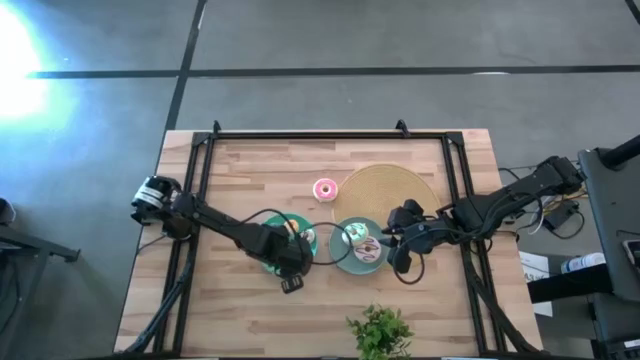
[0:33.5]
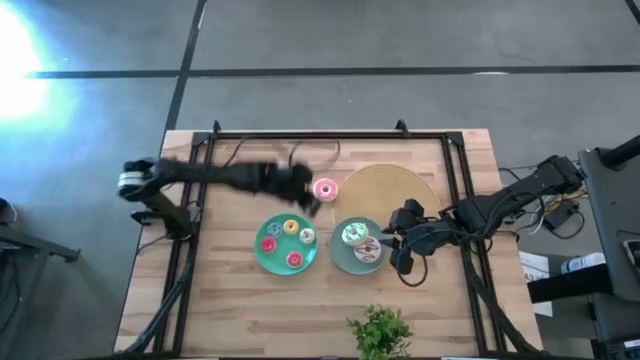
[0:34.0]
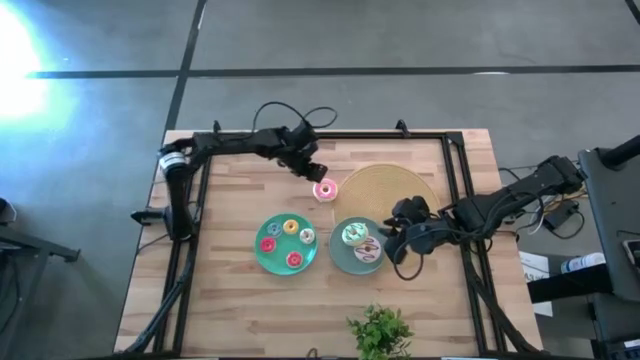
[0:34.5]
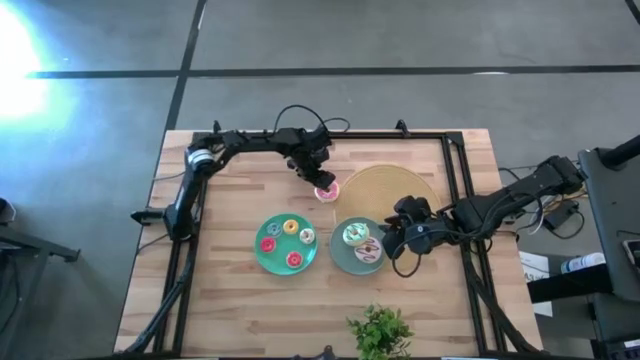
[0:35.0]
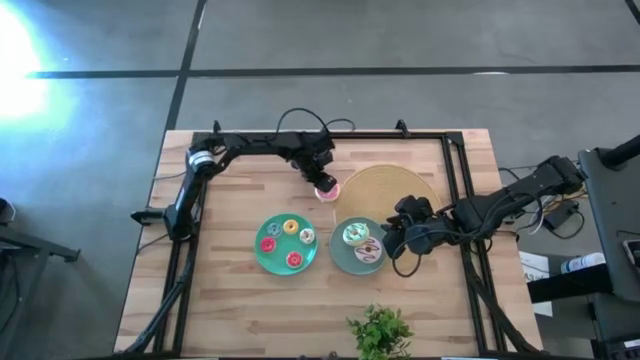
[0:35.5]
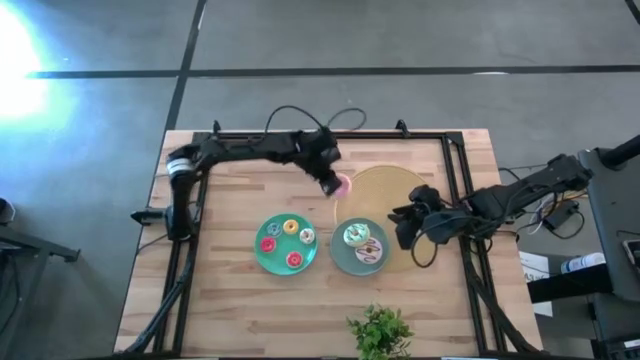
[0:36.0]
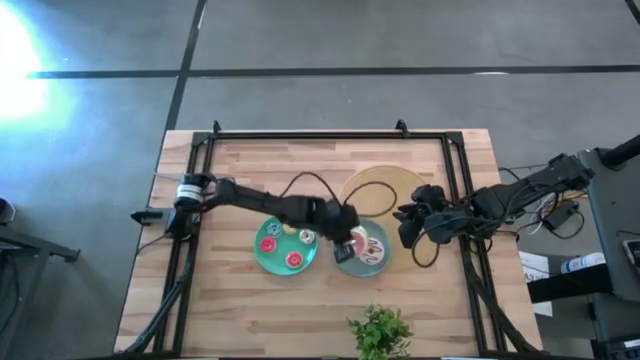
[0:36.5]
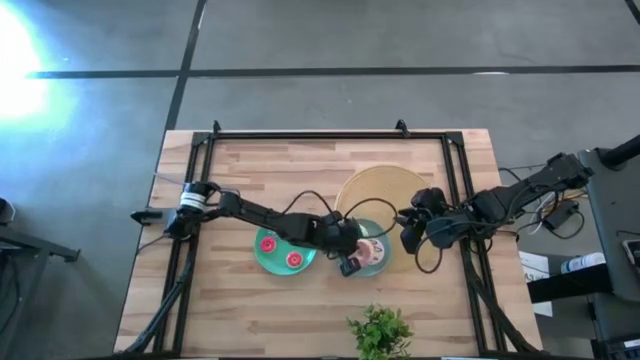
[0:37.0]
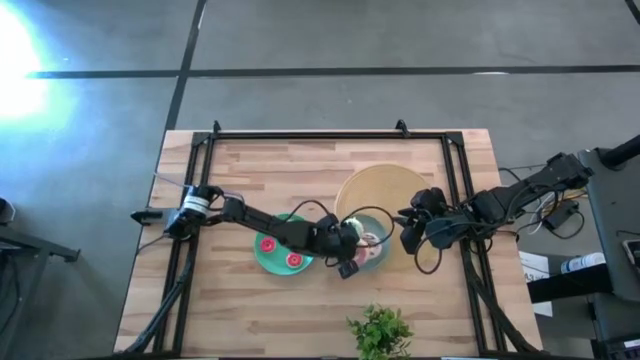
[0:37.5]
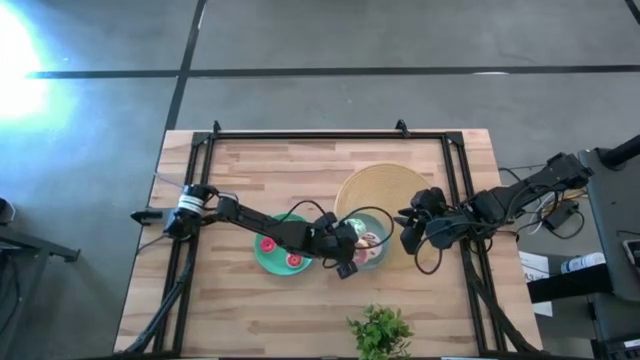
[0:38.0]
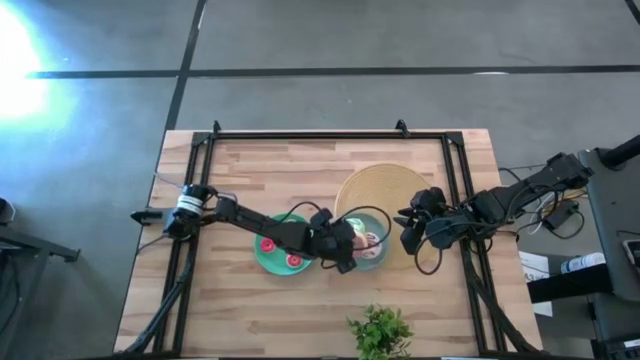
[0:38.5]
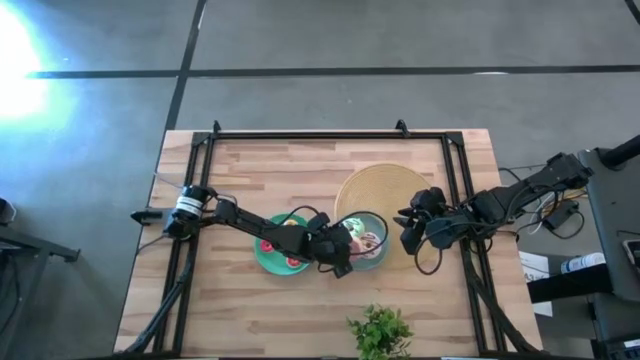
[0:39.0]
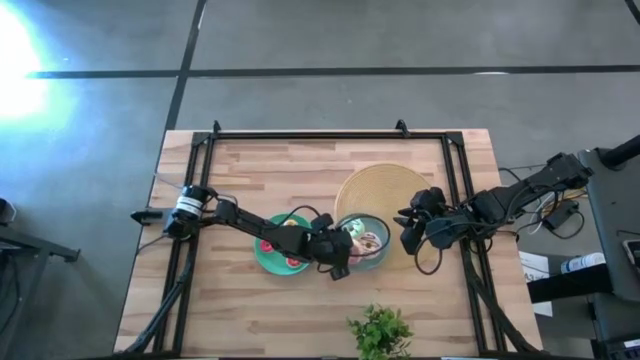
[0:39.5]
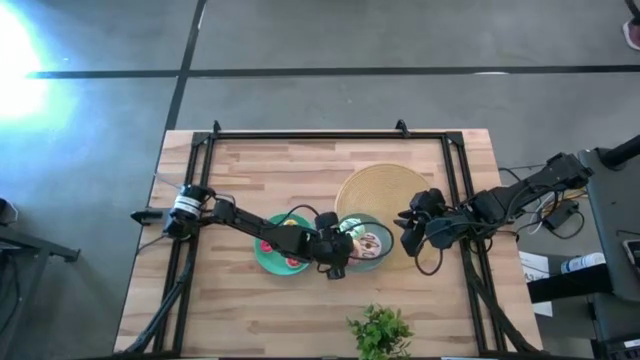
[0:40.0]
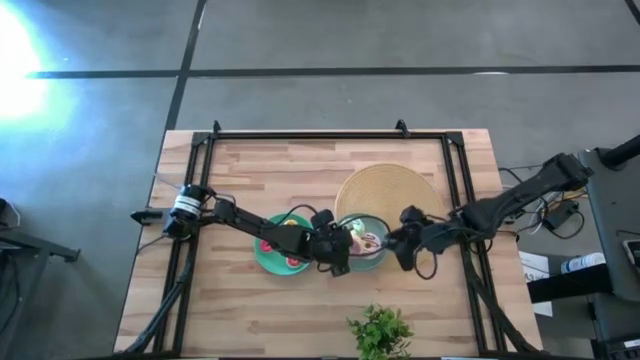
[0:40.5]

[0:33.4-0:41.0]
Task: Pick & Place donuts
Put the big pink donut on the light blue plate

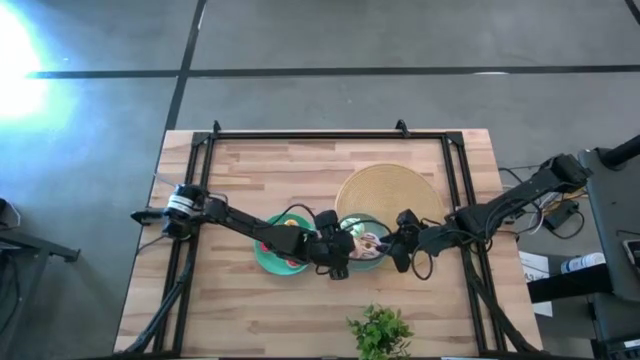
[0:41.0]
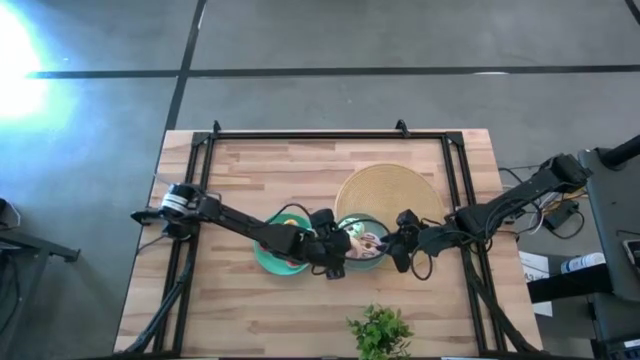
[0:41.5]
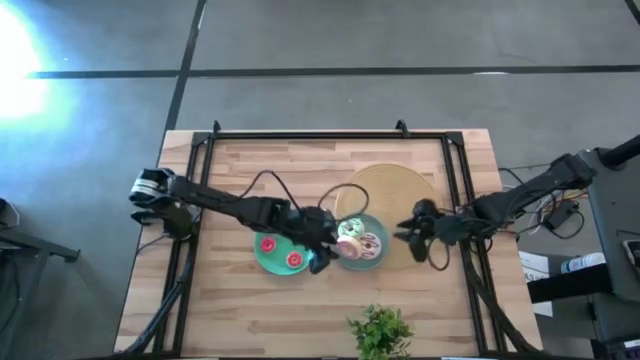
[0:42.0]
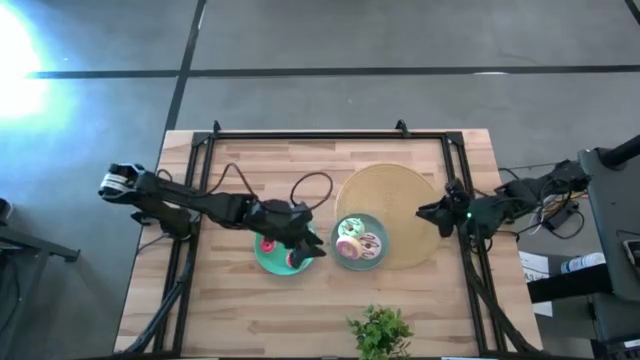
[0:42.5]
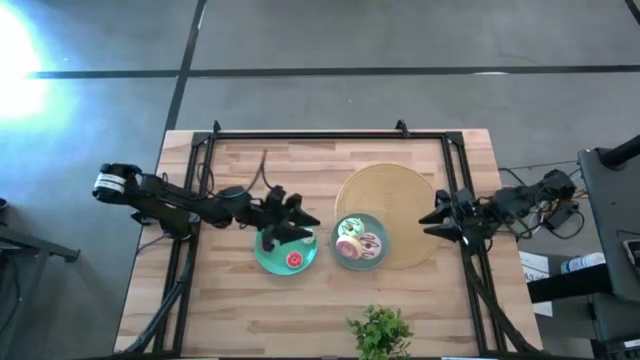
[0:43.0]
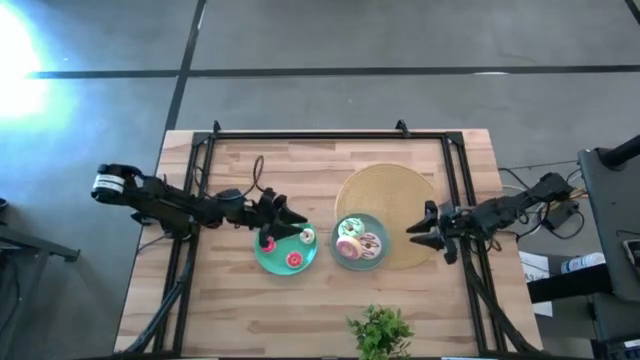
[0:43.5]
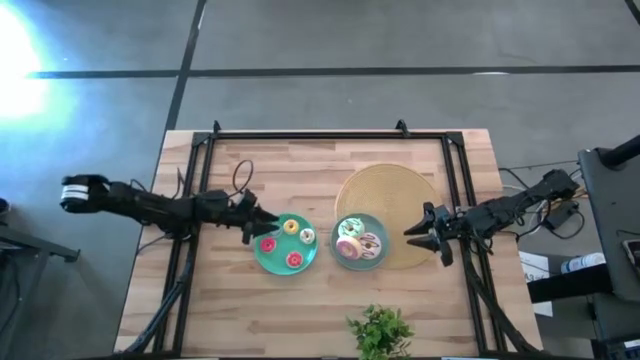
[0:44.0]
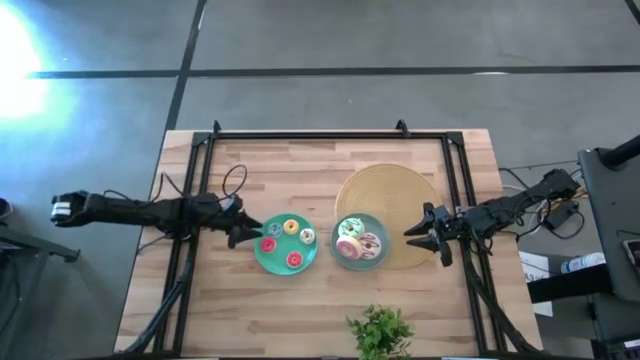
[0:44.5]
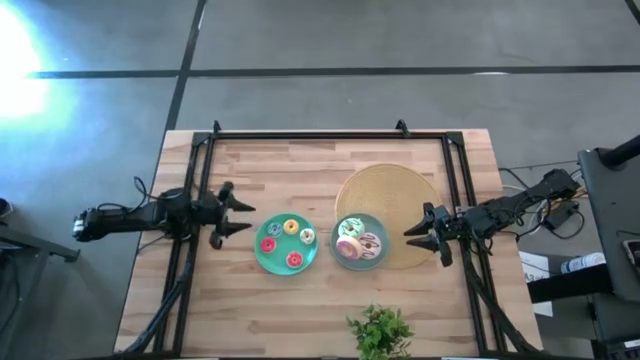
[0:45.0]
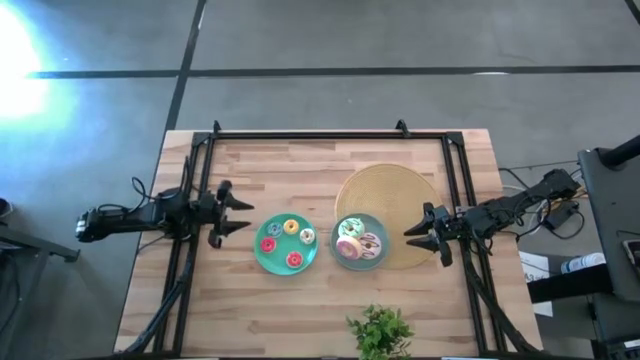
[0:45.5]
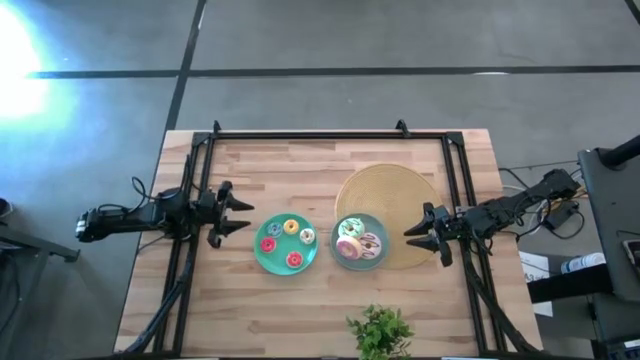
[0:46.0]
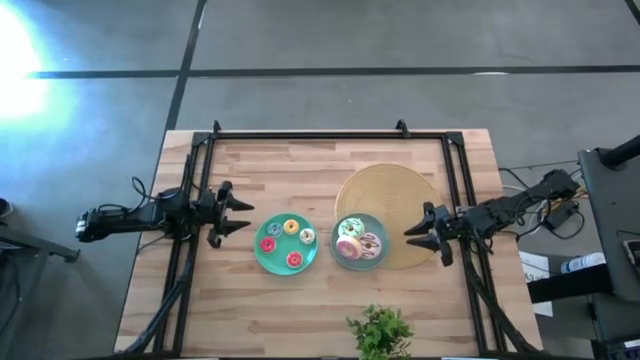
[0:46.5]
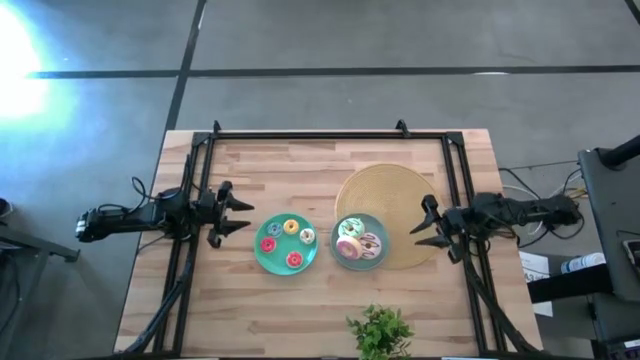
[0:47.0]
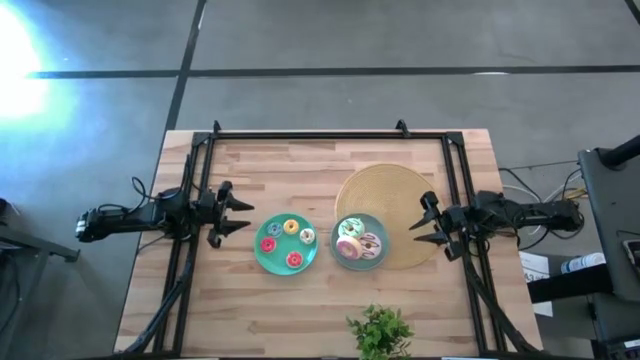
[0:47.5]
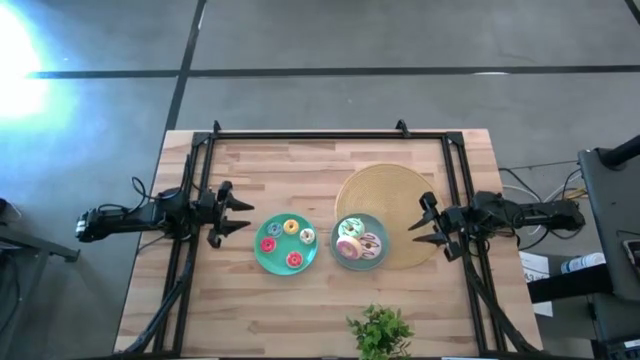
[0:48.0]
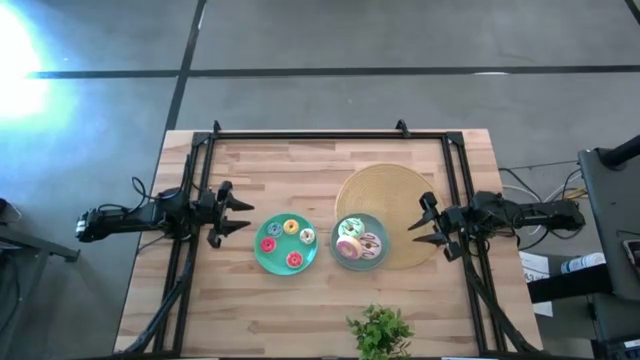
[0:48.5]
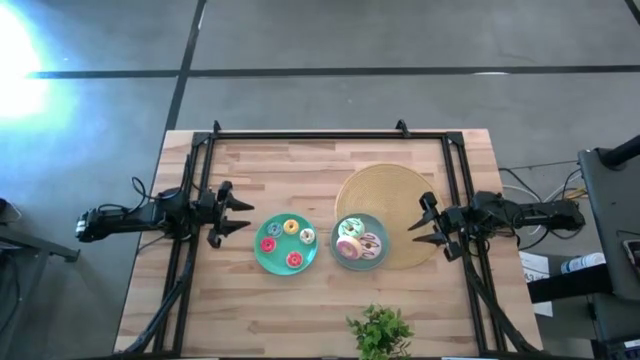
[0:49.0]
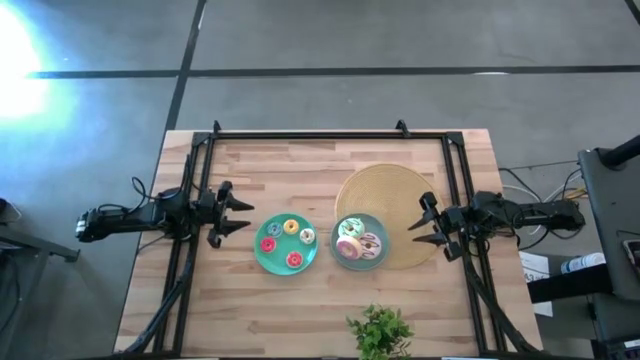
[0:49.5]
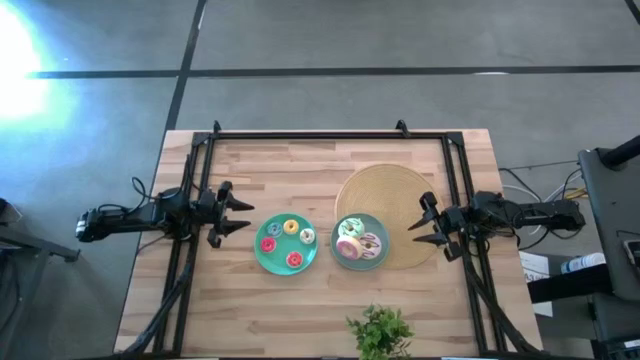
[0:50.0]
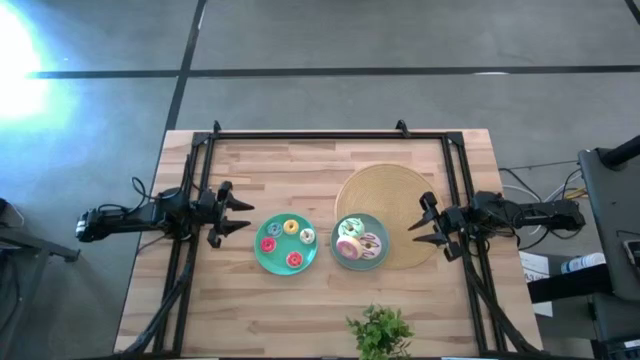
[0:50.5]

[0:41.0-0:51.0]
Return to Home Position

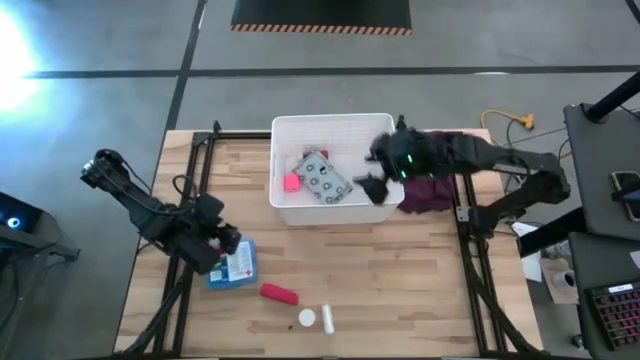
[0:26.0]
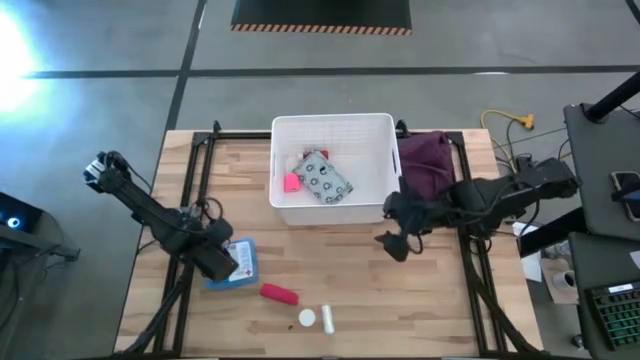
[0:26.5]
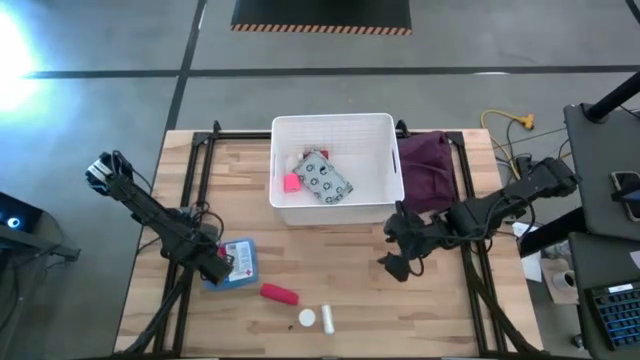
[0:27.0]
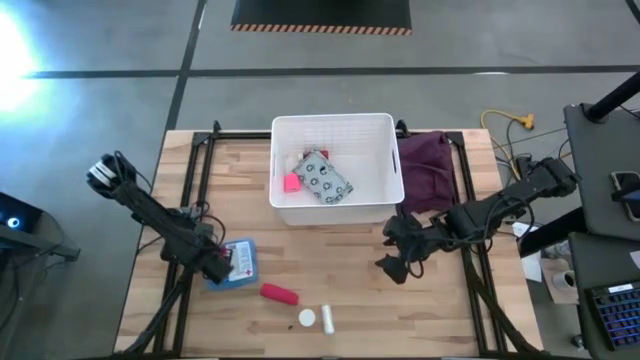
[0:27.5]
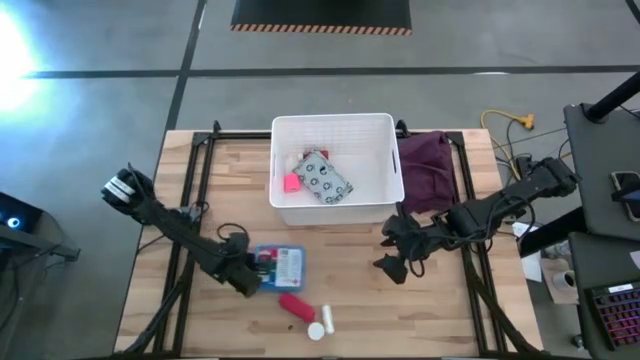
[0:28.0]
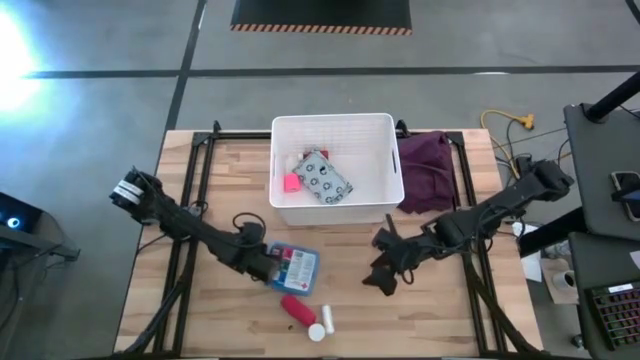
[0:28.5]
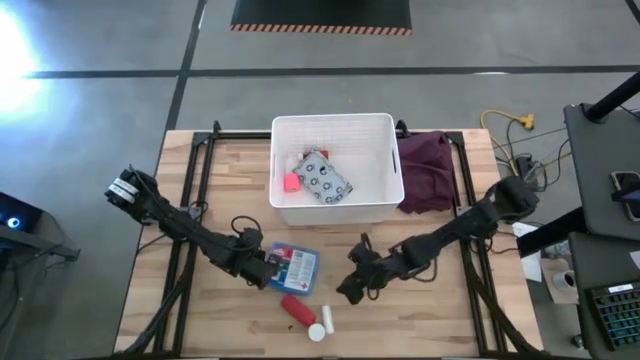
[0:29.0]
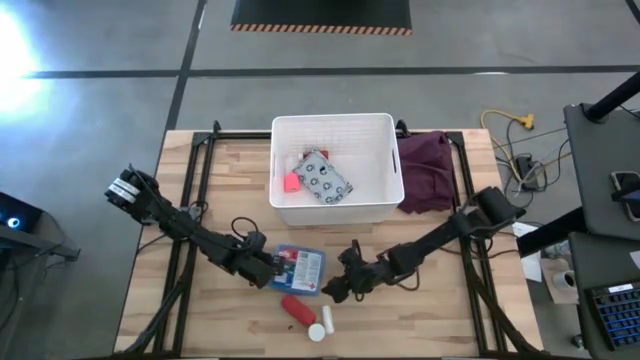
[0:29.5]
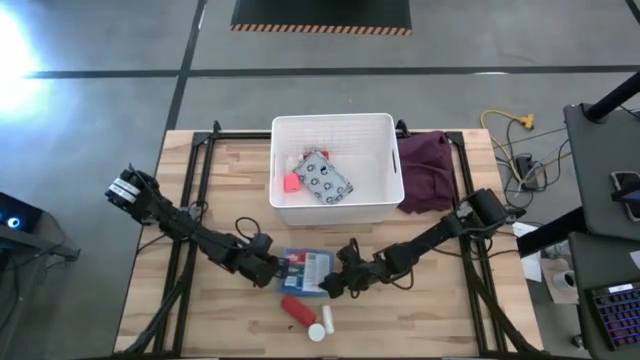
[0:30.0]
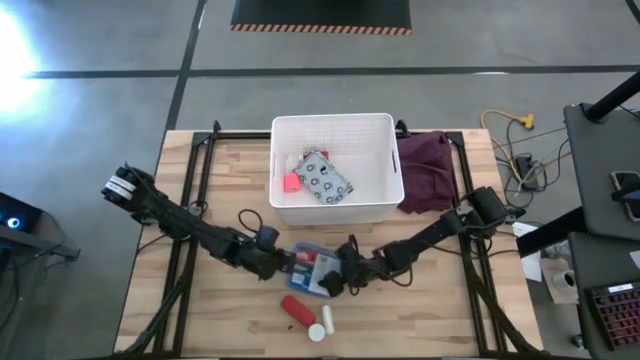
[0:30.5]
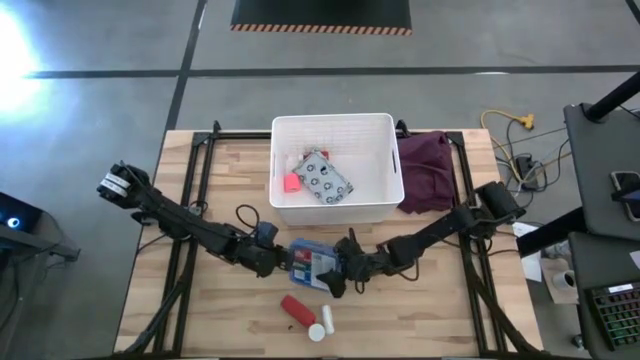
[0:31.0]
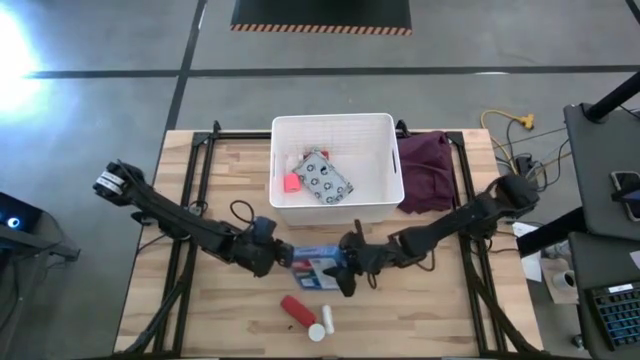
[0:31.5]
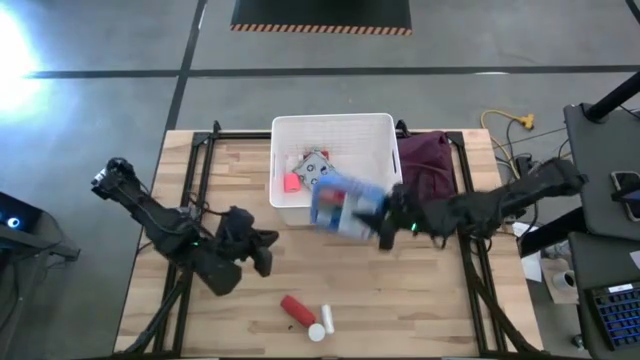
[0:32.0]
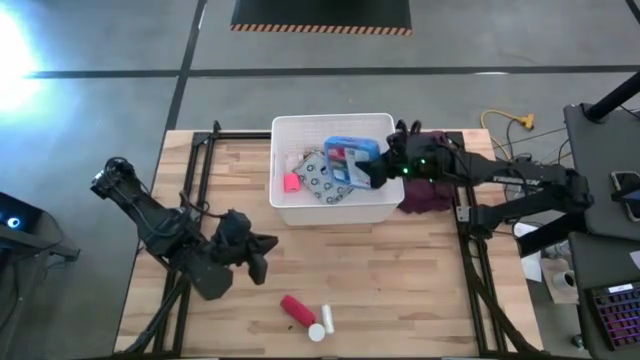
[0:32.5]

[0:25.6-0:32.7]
Task: Pick & place medical supplies in basket/bin
Put the blue first aid kit into the white bin
